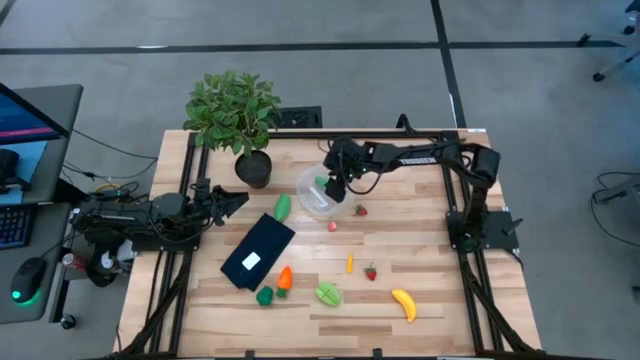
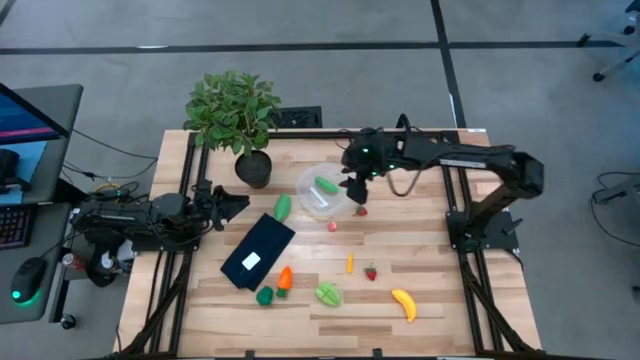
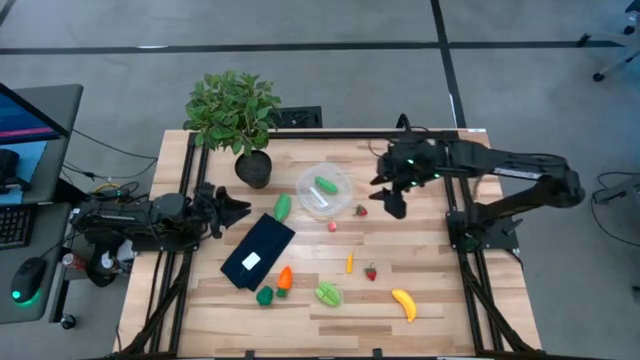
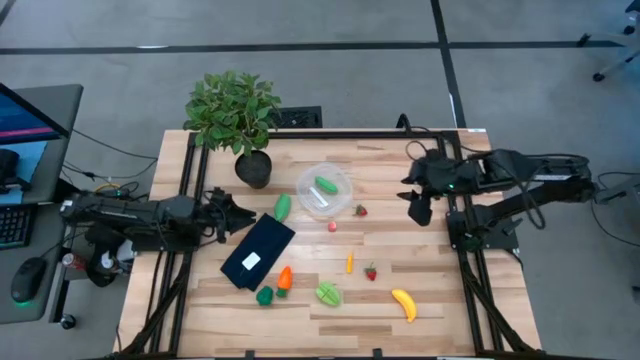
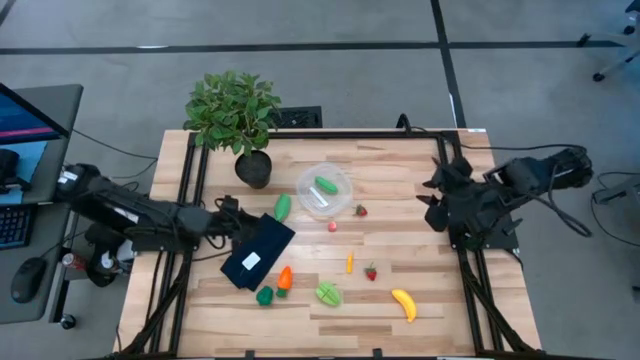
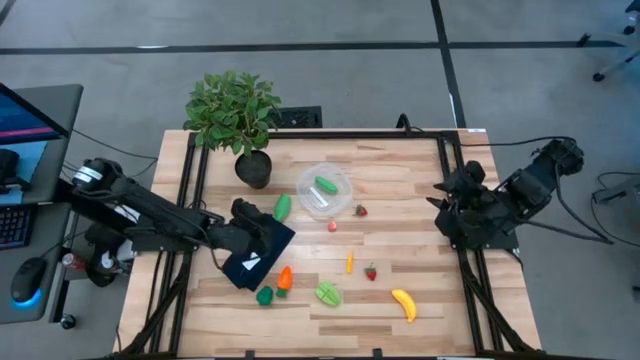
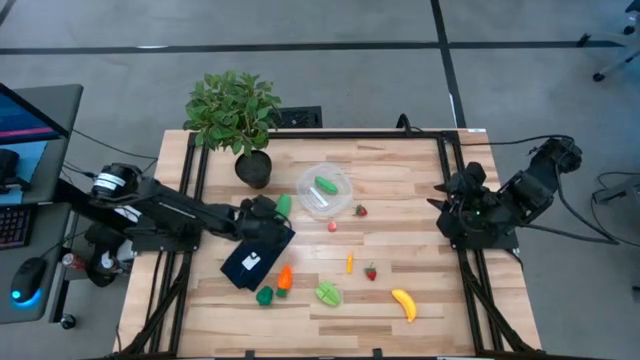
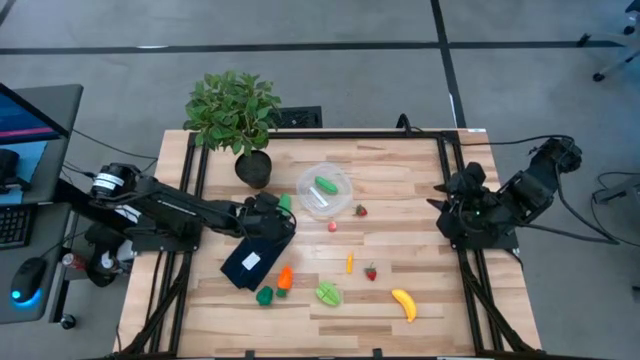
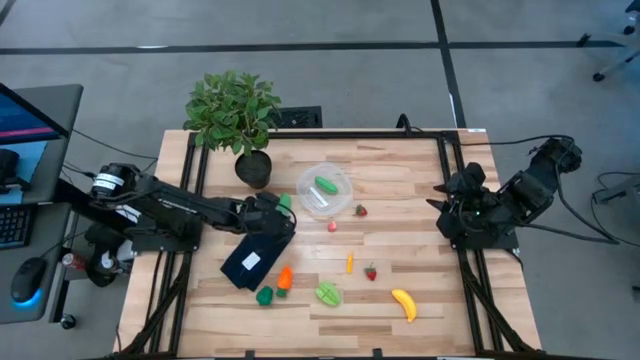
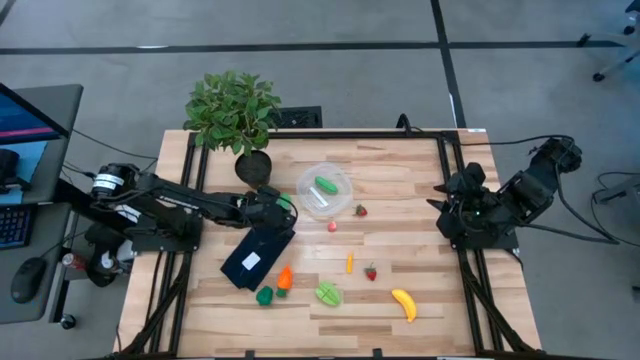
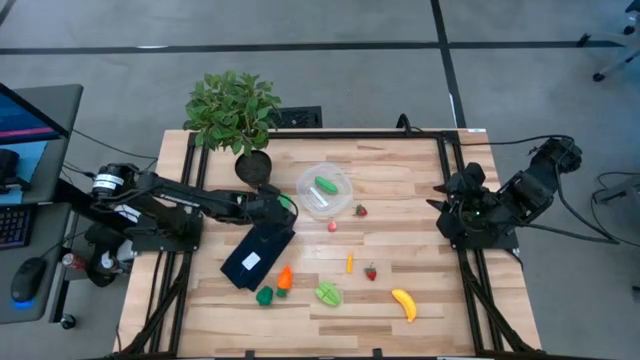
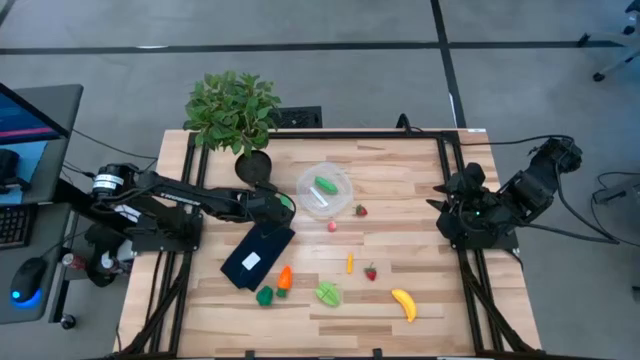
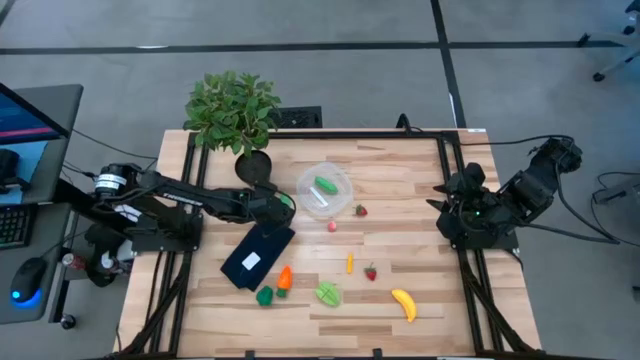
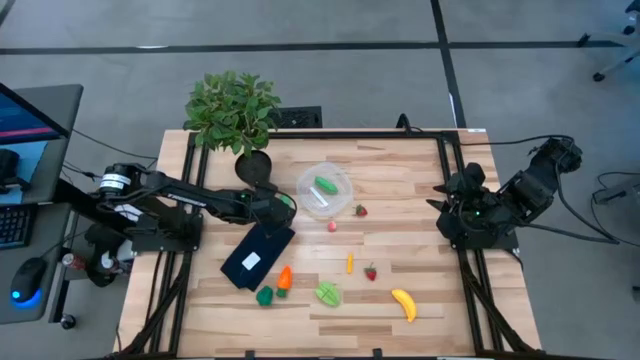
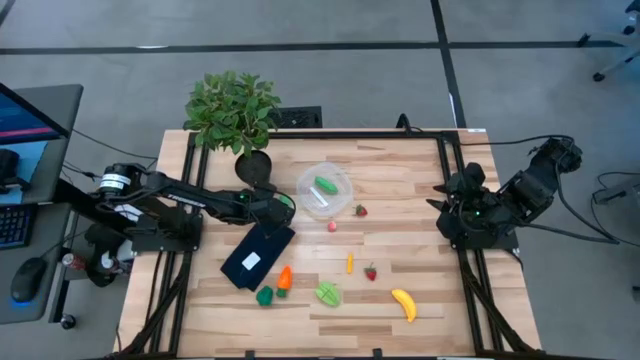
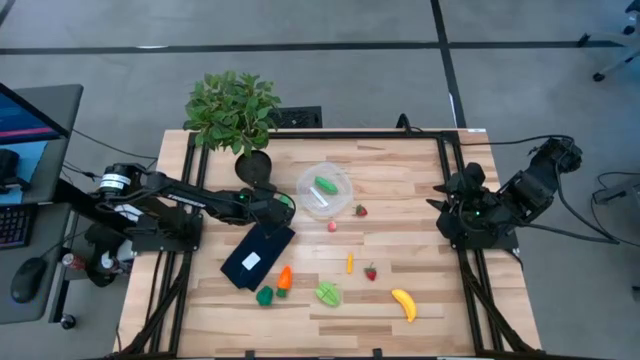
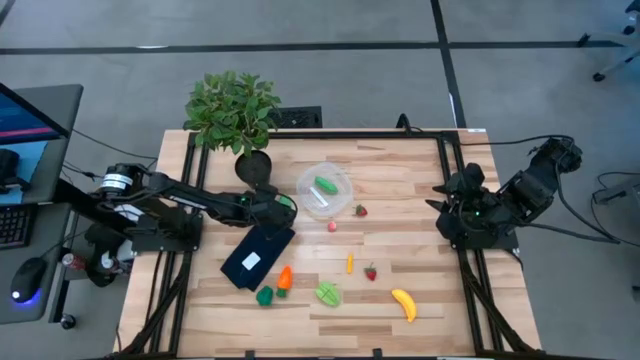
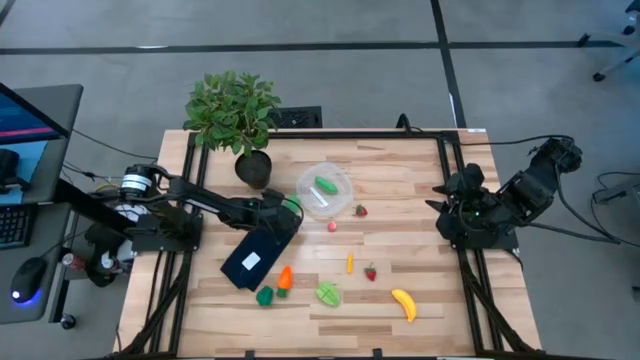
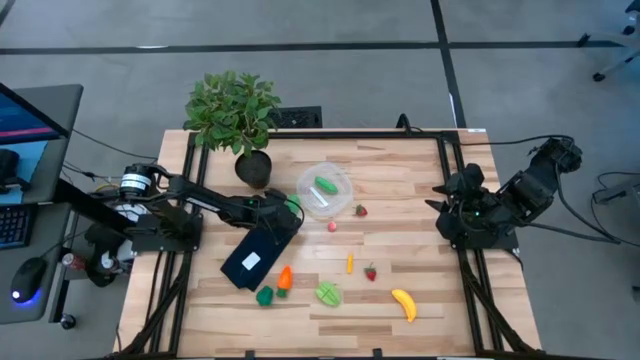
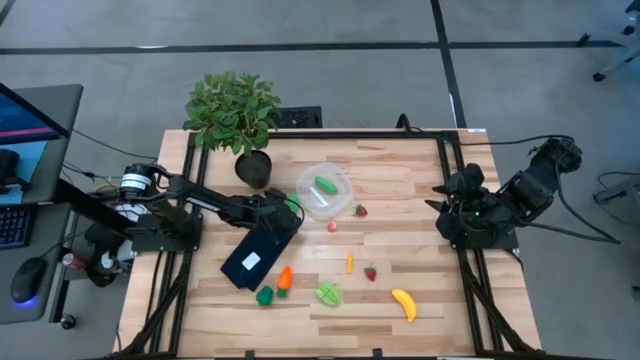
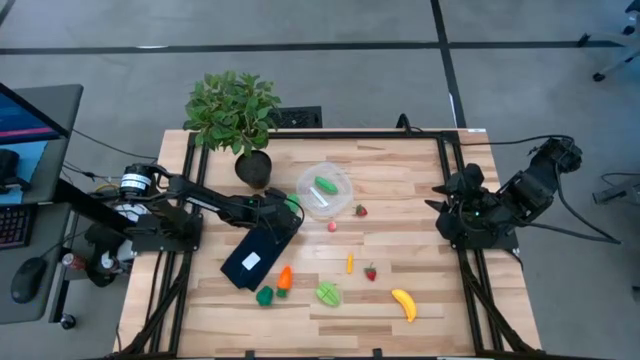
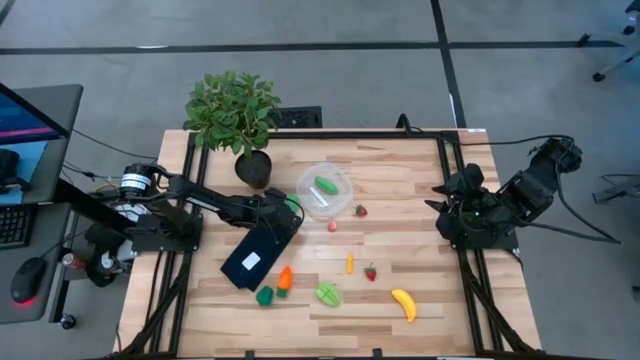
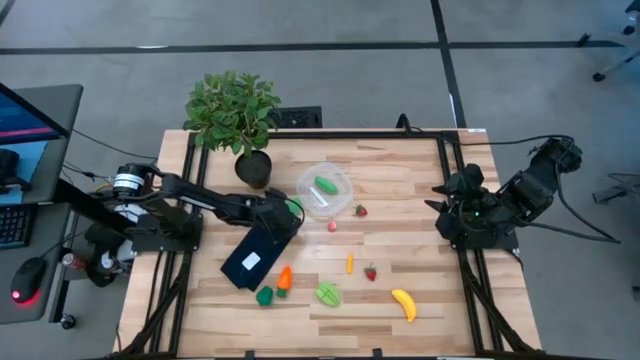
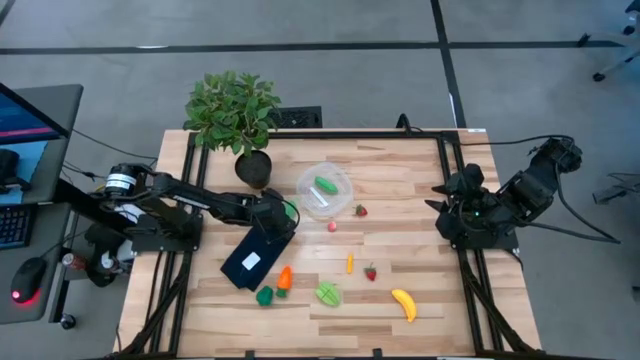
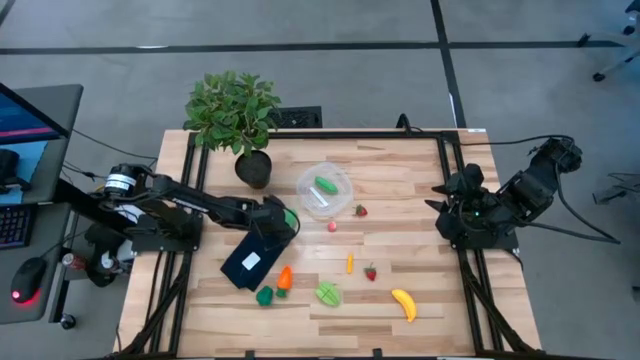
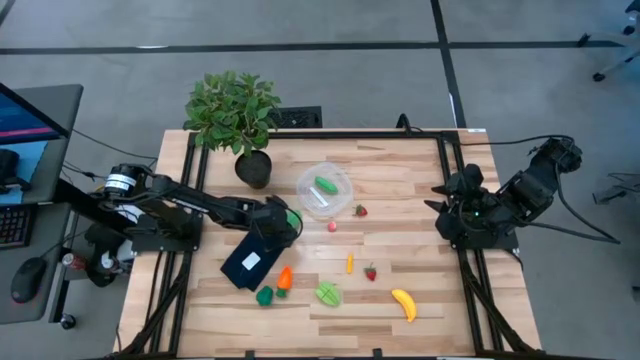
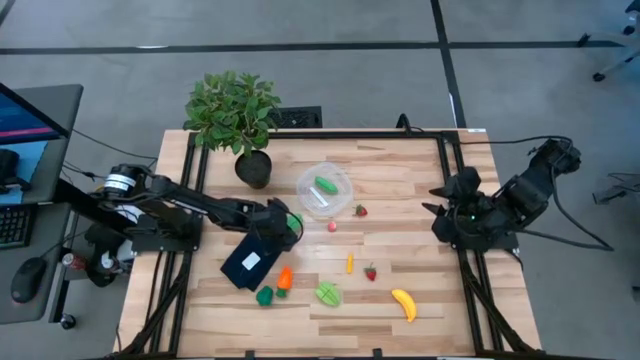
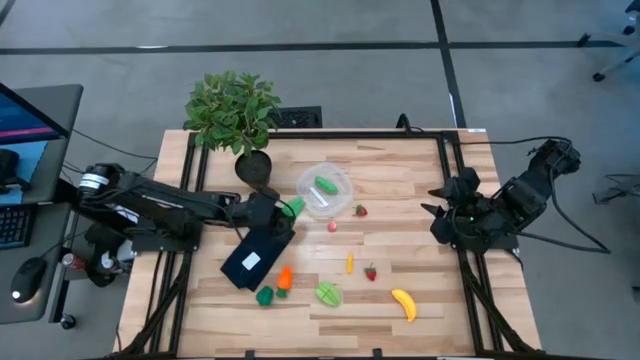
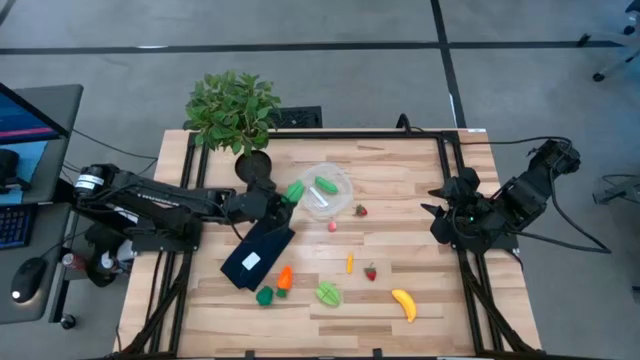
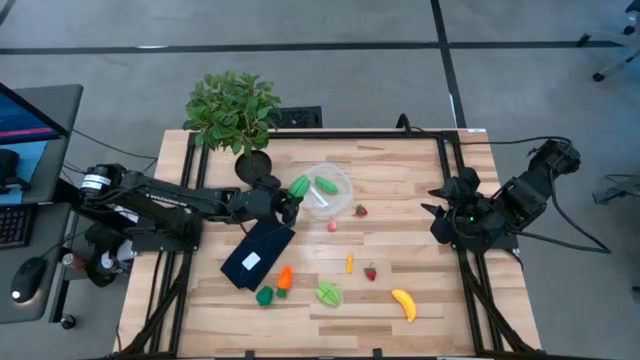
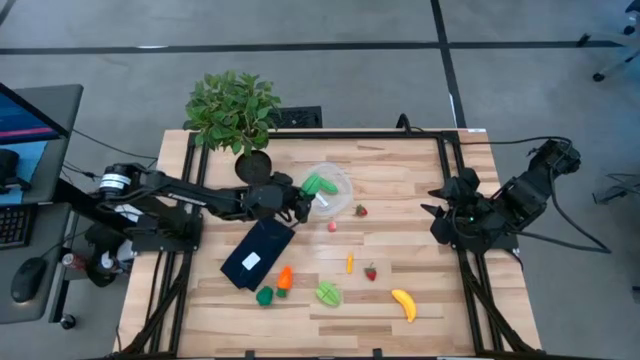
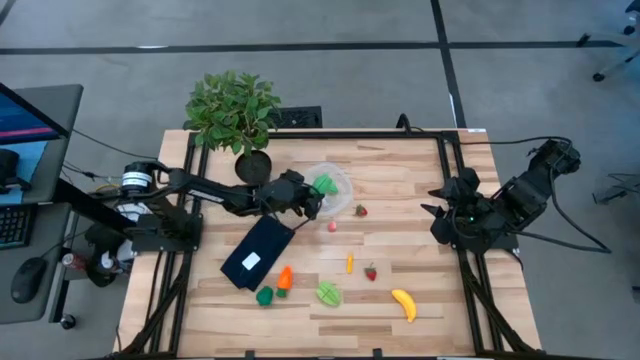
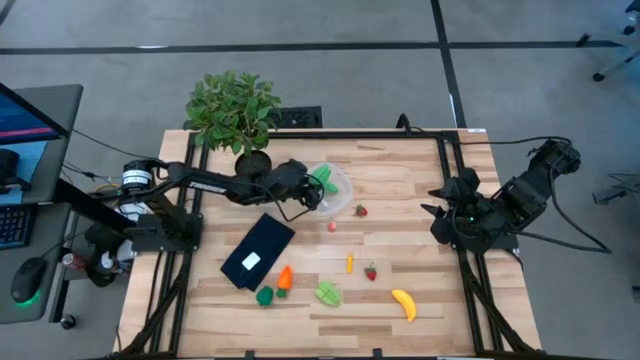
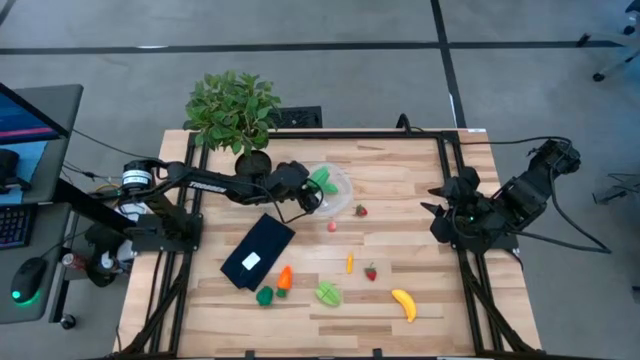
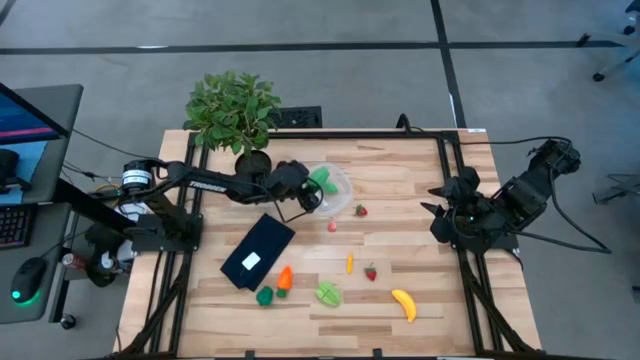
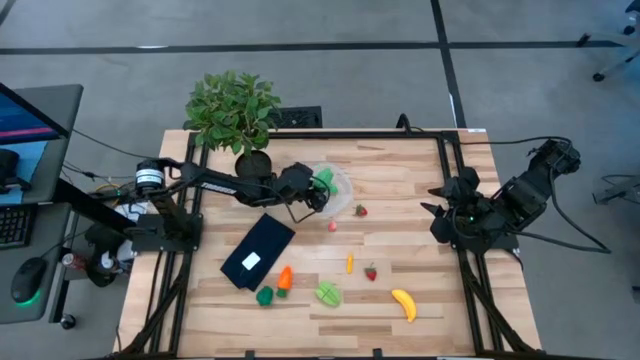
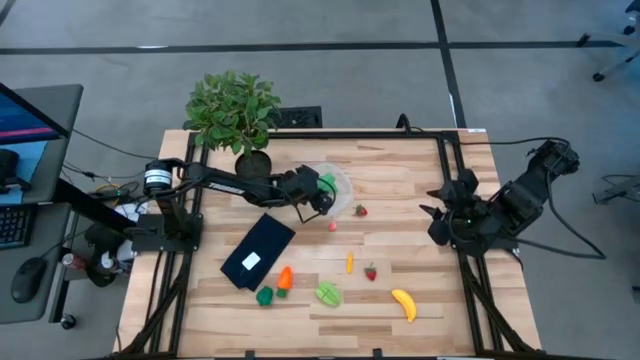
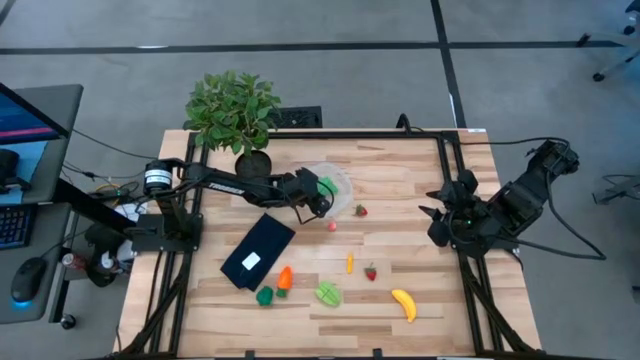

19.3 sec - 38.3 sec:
Task: Pick and placing Produce into tupperware
Put the green corncob into the transparent bin

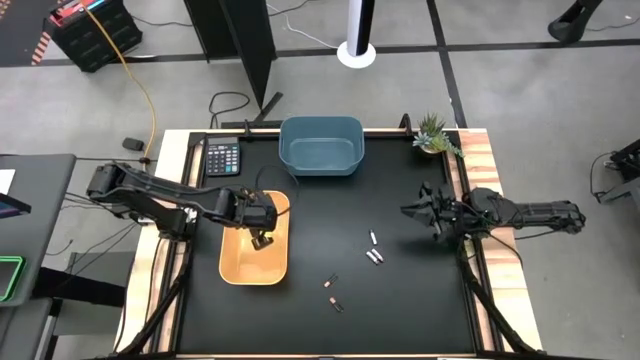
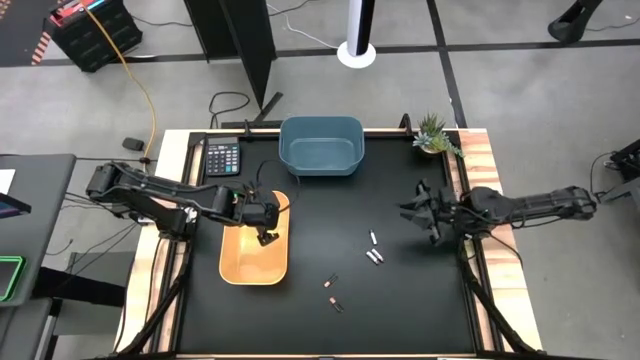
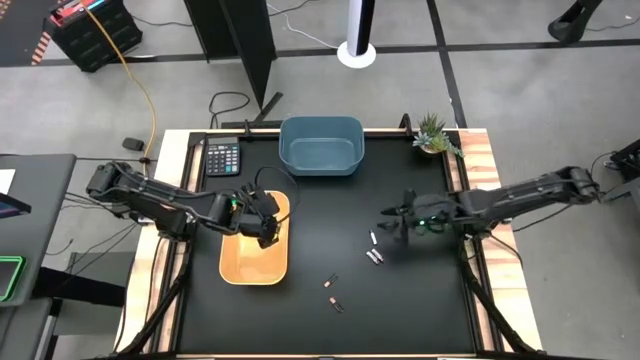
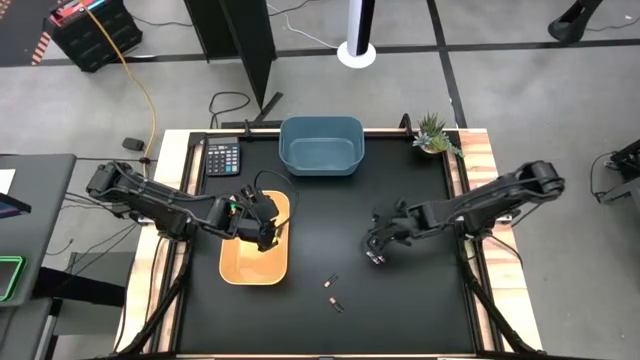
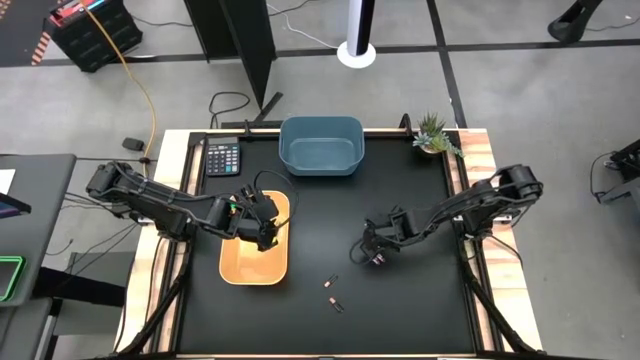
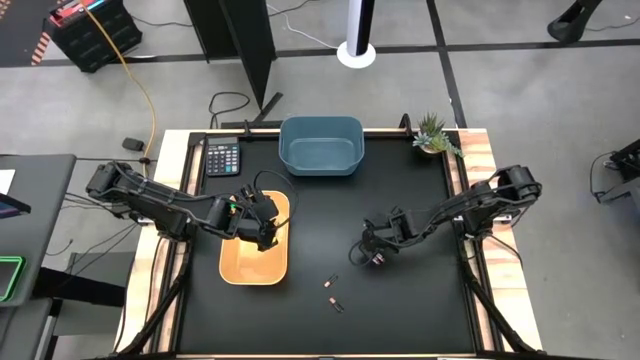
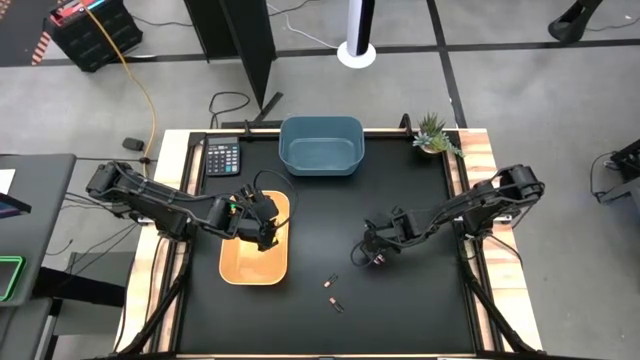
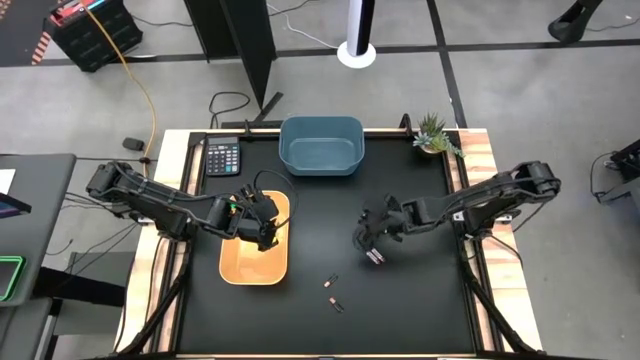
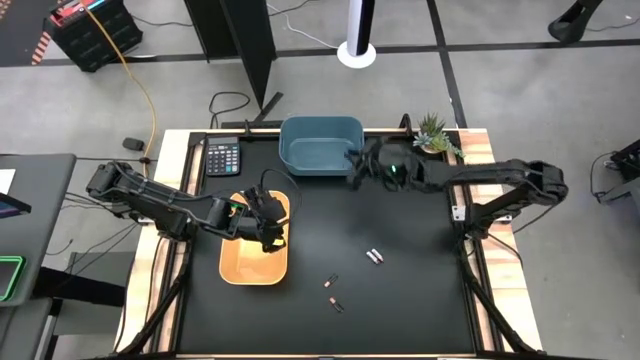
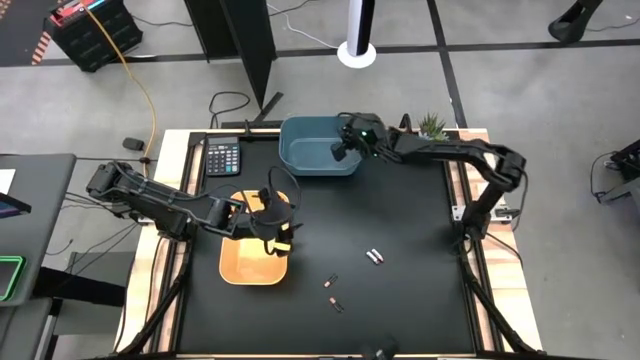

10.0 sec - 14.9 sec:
Task: Sort batteries
Put the top silver battery into the blue bin
